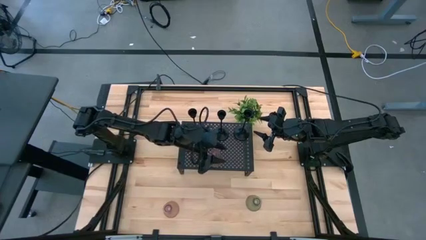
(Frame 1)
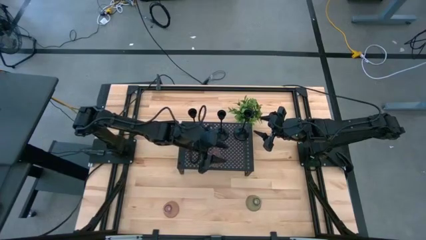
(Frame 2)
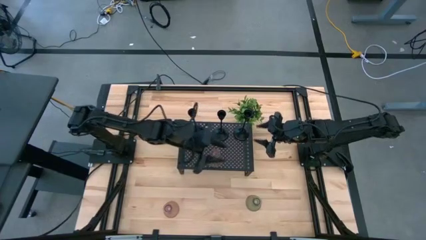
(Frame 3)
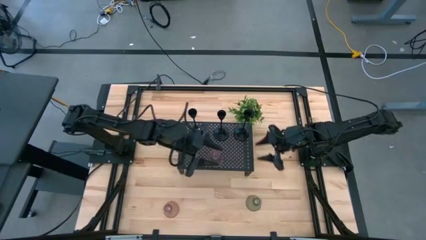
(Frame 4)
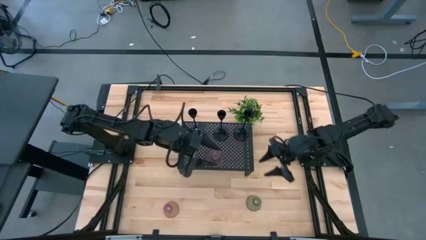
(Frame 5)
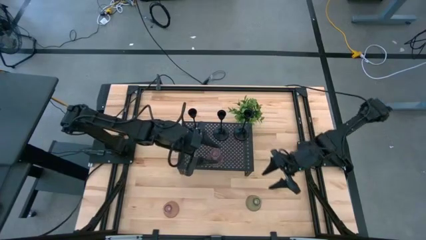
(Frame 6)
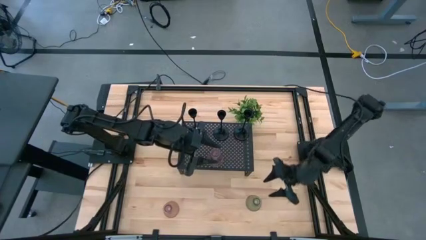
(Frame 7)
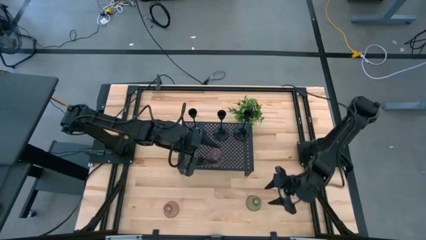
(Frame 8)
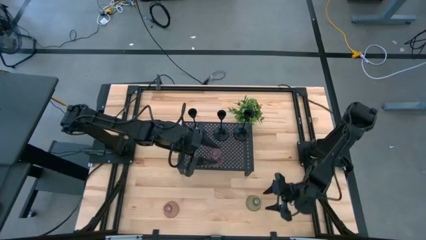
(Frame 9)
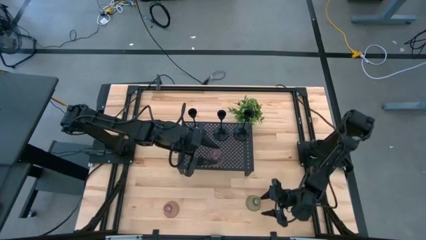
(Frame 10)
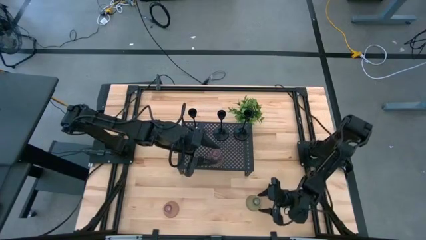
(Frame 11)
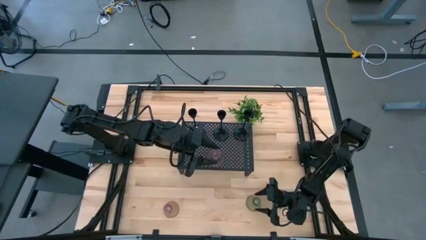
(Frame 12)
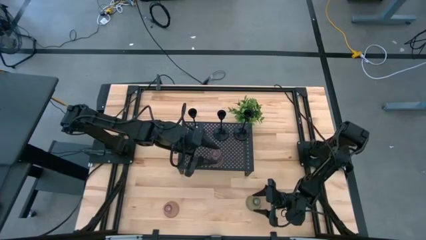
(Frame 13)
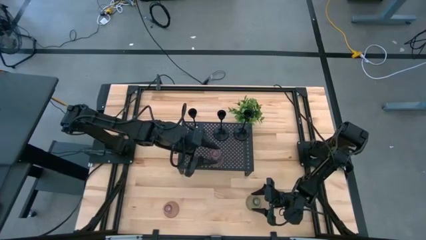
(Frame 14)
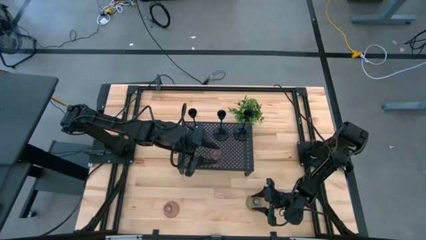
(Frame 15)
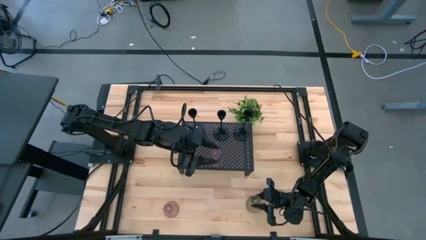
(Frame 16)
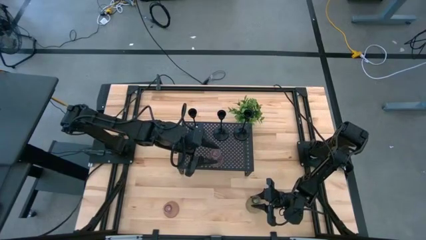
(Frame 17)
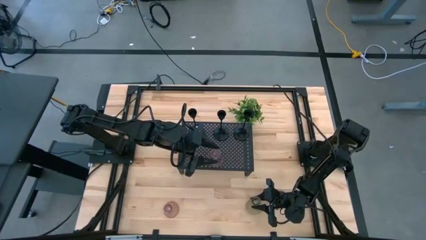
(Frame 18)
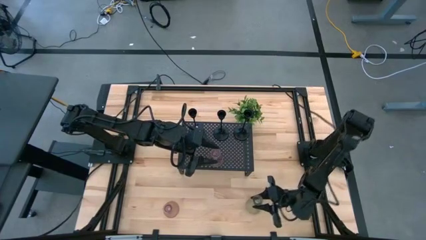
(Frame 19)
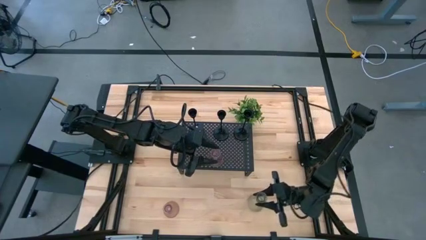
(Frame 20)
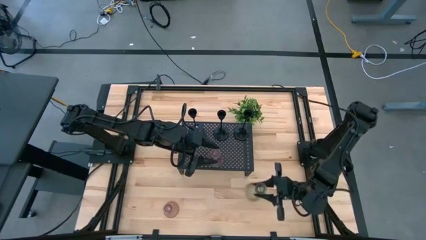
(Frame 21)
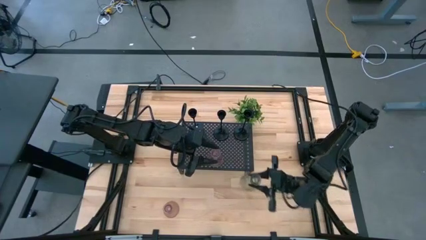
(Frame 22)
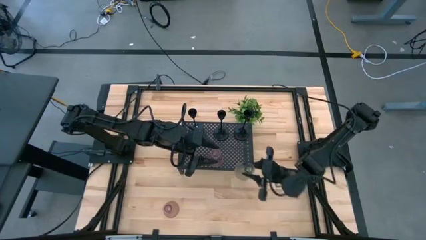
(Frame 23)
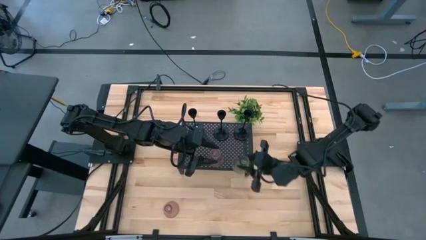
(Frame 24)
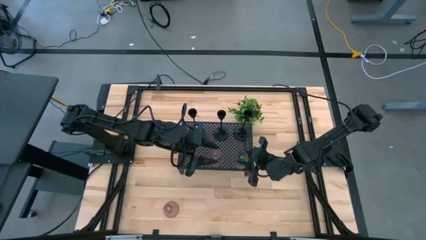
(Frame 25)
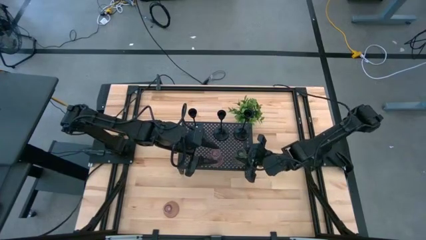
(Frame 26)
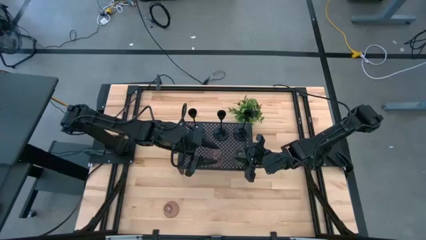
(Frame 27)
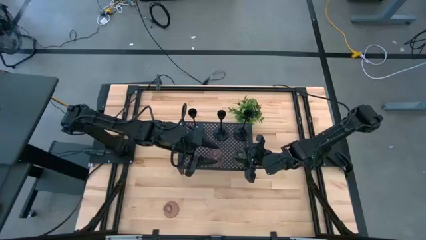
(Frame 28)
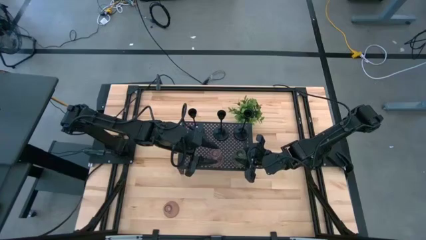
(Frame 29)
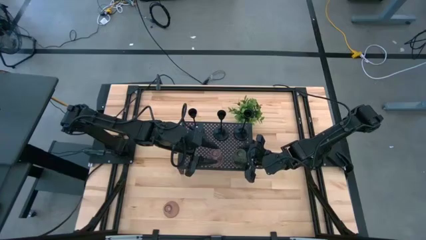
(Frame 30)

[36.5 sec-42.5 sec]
Task: Pick & Place candle stick holders
Put the green candle holder on the shelf

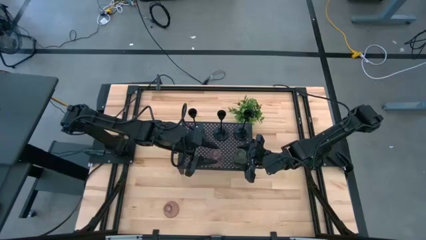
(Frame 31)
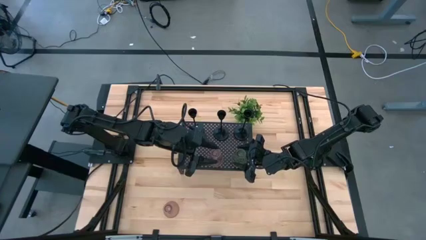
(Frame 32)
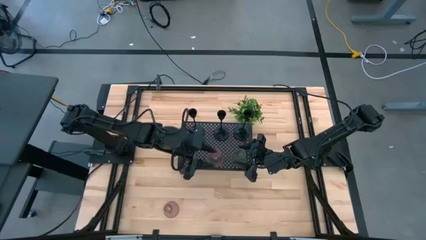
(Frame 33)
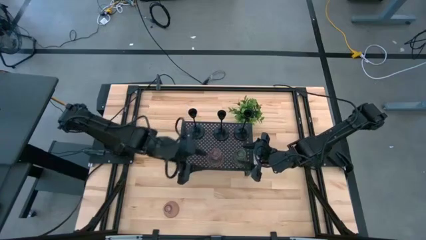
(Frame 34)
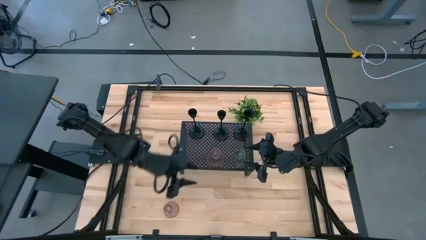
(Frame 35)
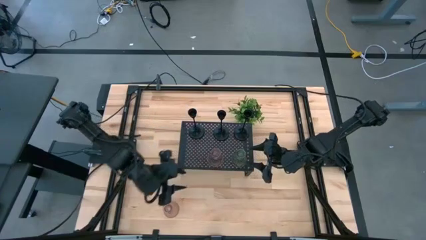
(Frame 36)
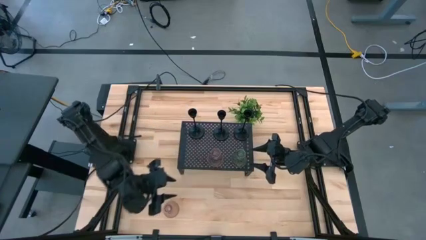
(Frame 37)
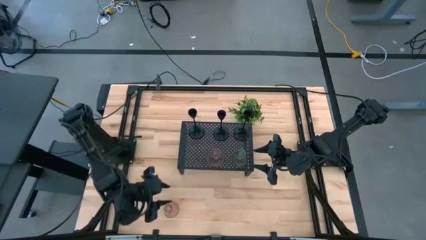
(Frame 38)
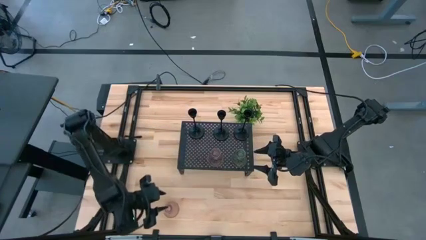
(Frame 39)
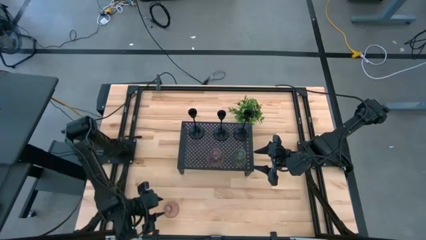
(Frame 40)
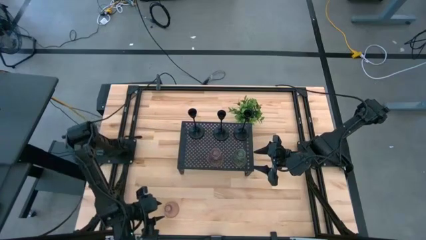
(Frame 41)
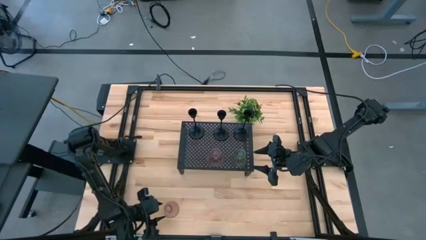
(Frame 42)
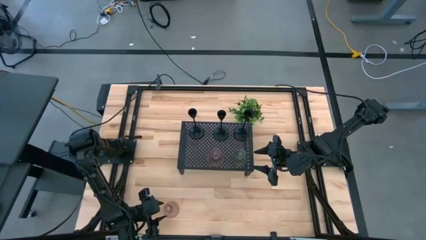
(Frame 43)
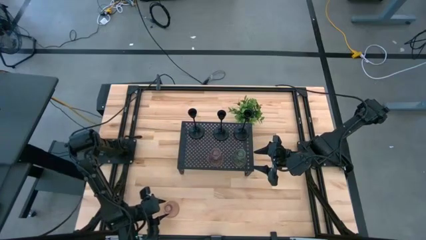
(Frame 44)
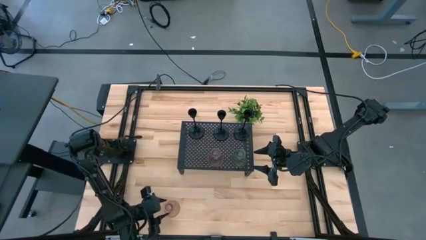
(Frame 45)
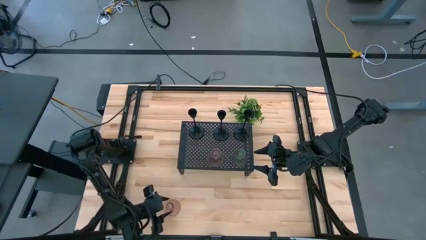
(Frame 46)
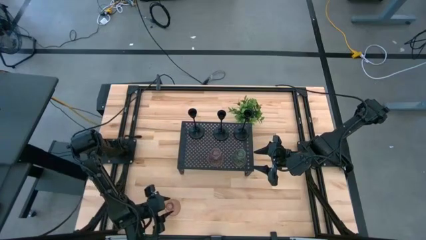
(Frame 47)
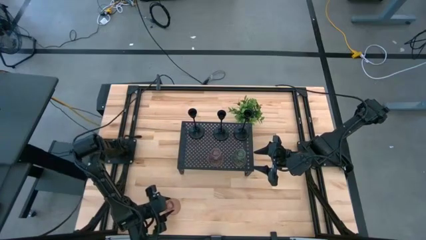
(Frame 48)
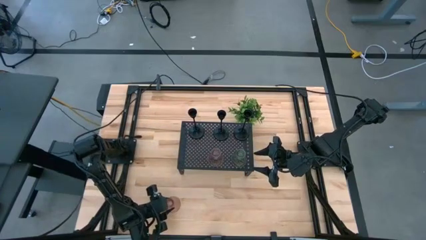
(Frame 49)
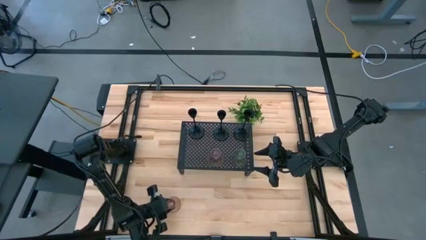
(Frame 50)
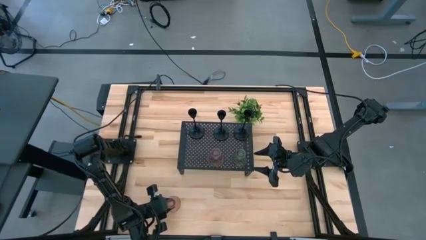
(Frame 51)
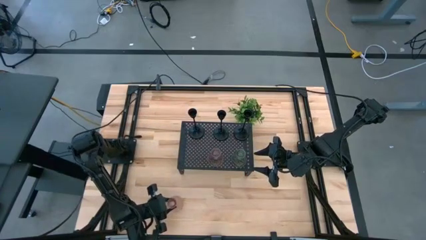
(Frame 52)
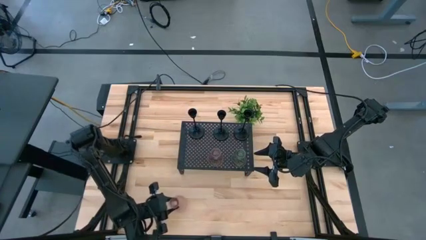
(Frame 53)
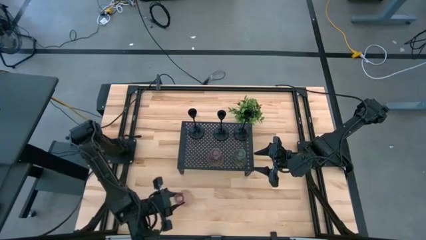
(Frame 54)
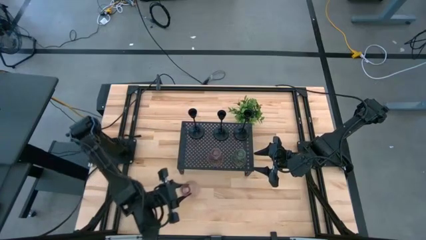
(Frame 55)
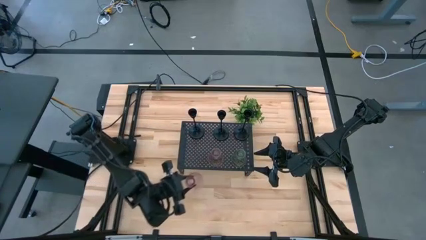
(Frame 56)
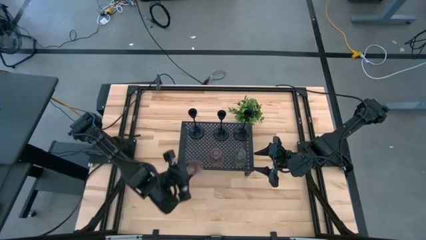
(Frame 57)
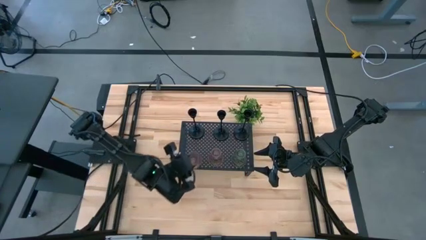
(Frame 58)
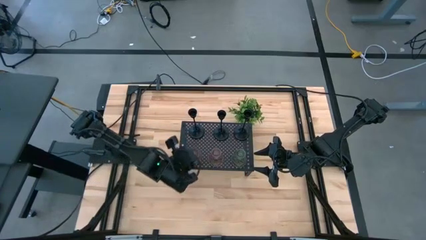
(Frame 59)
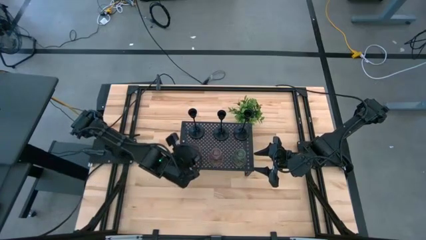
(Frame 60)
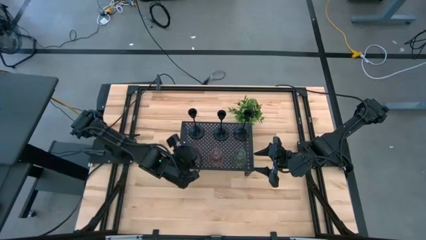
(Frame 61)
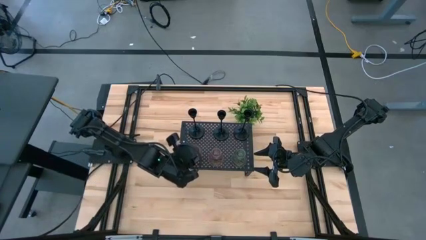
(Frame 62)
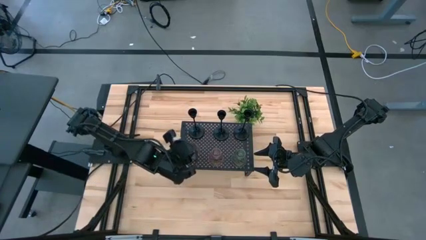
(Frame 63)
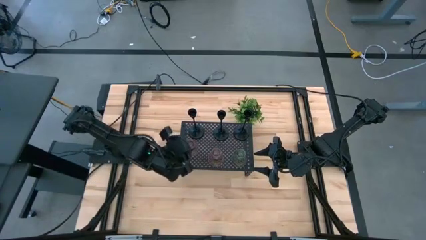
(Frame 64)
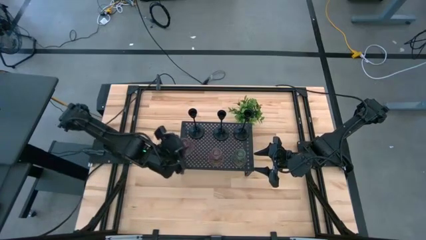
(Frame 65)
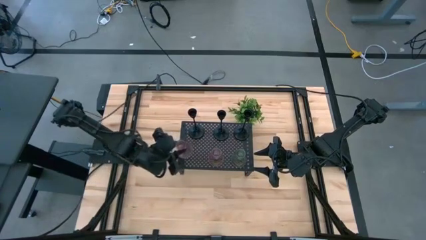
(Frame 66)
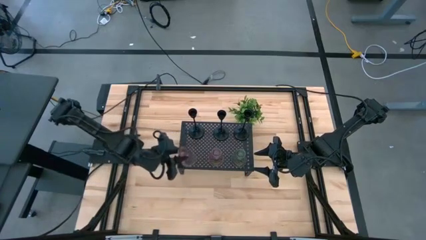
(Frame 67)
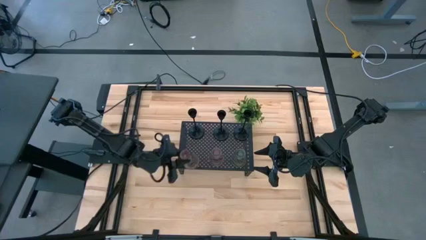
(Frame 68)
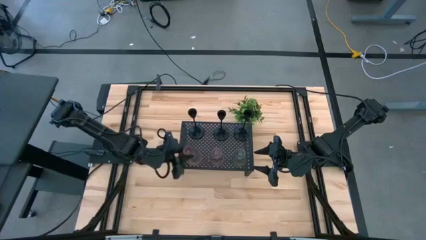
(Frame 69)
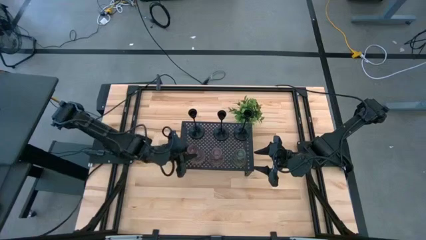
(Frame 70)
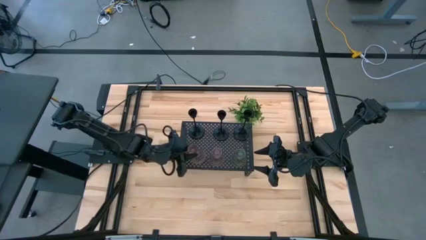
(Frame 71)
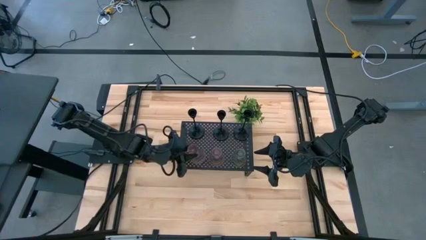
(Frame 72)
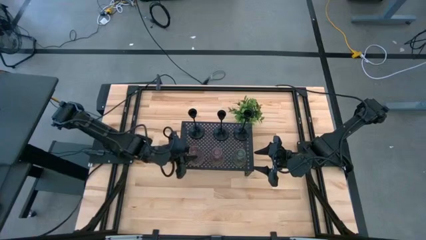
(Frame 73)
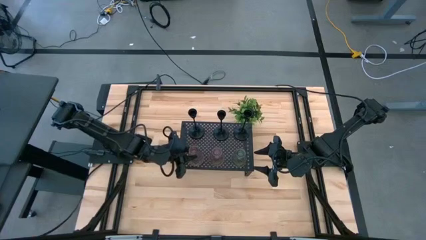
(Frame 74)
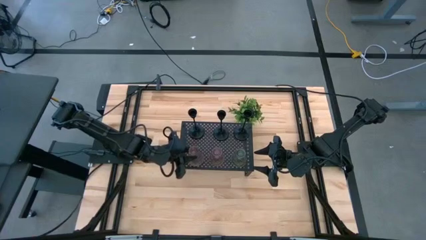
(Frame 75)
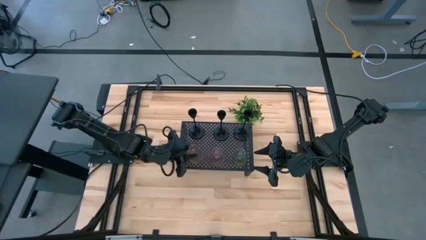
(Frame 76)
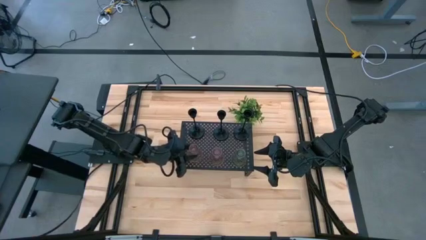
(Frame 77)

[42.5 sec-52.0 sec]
Put the pink candle holder on the shelf
